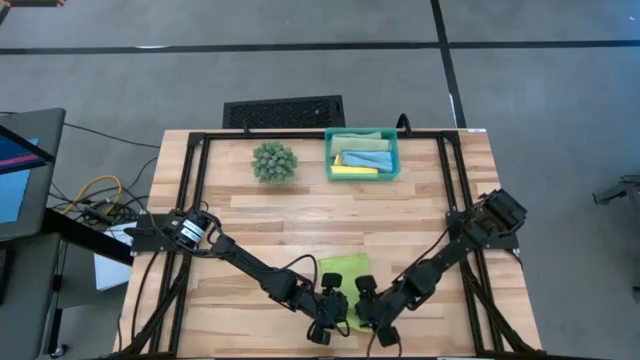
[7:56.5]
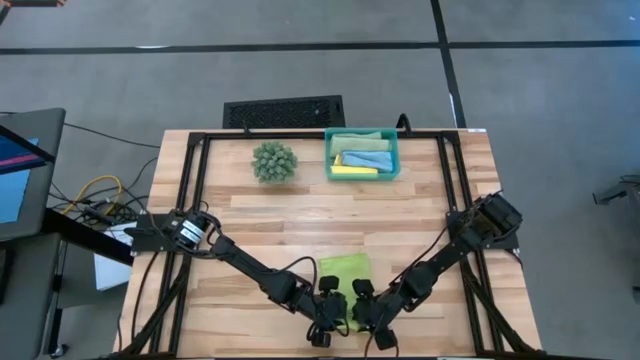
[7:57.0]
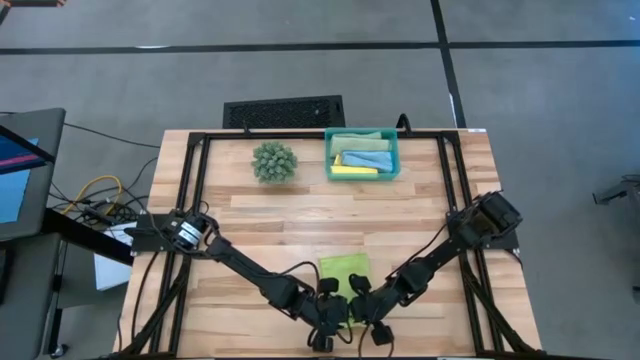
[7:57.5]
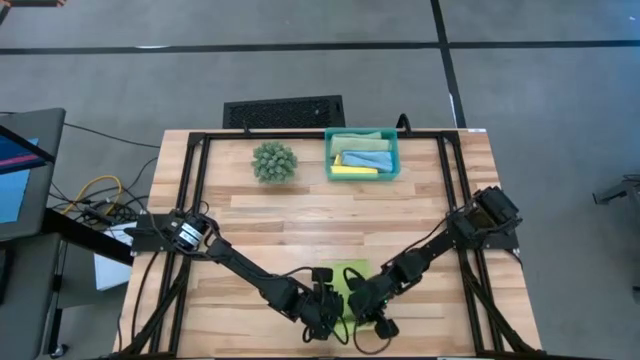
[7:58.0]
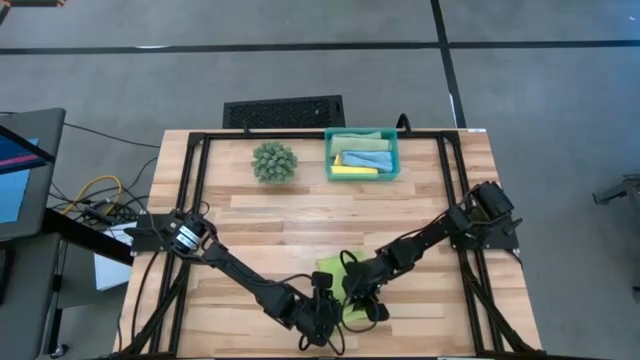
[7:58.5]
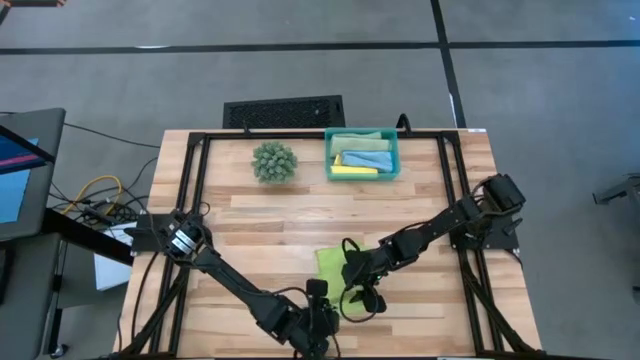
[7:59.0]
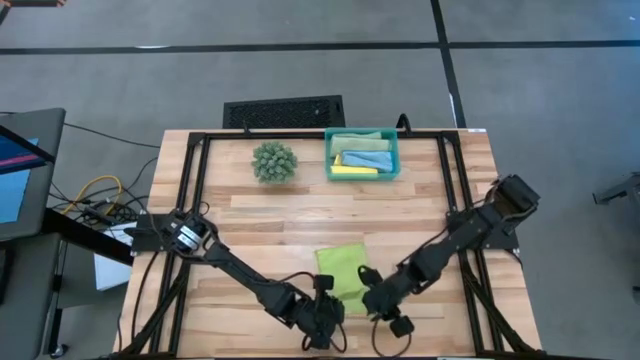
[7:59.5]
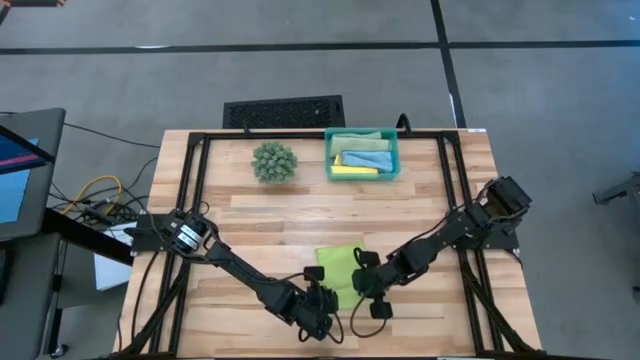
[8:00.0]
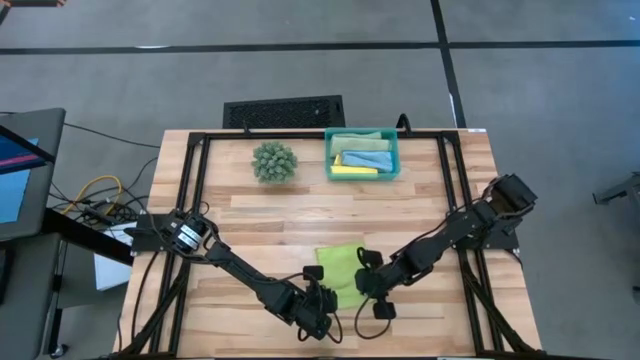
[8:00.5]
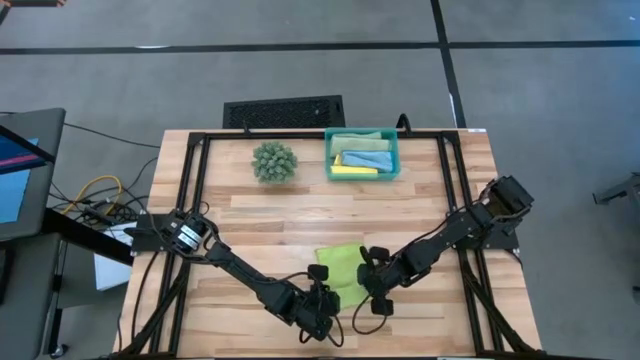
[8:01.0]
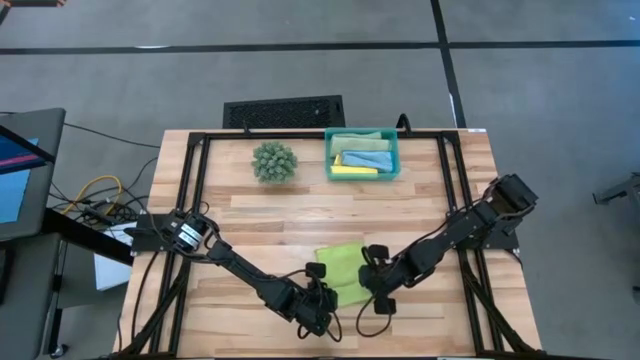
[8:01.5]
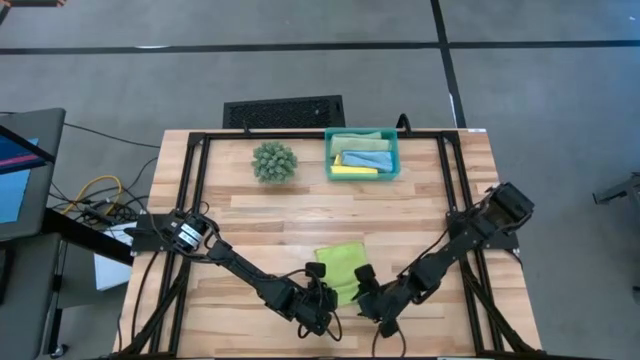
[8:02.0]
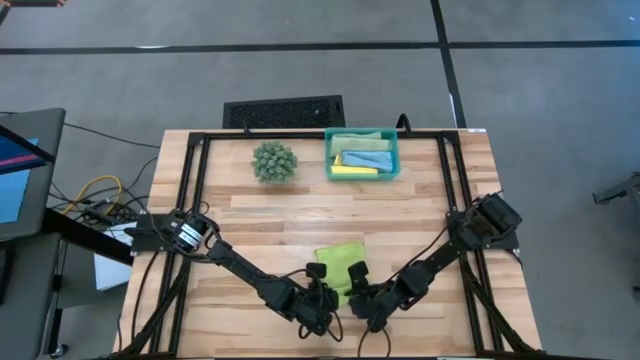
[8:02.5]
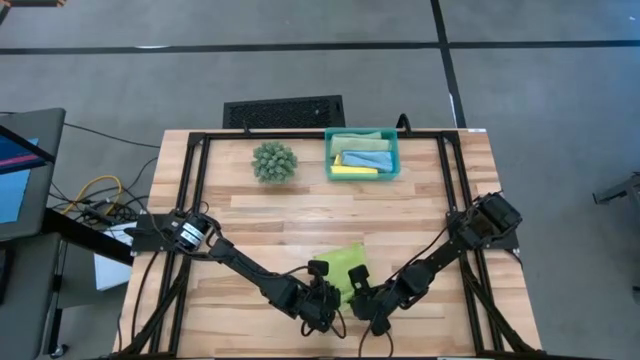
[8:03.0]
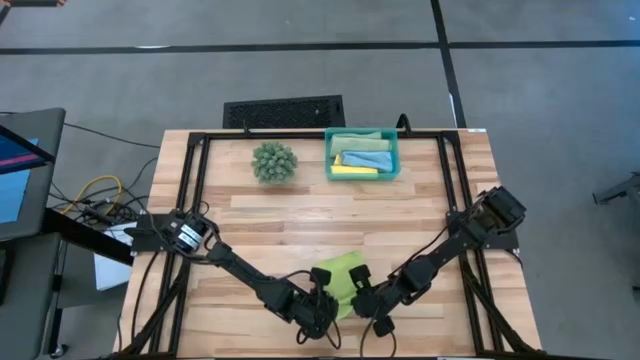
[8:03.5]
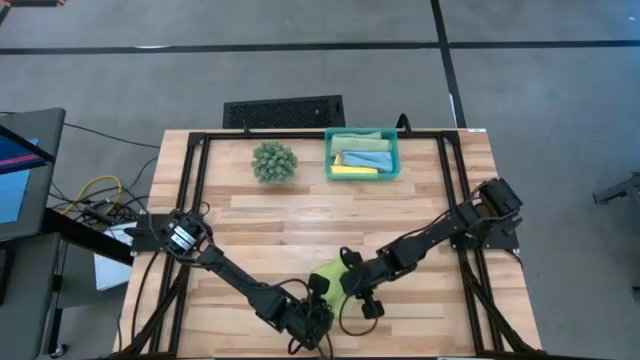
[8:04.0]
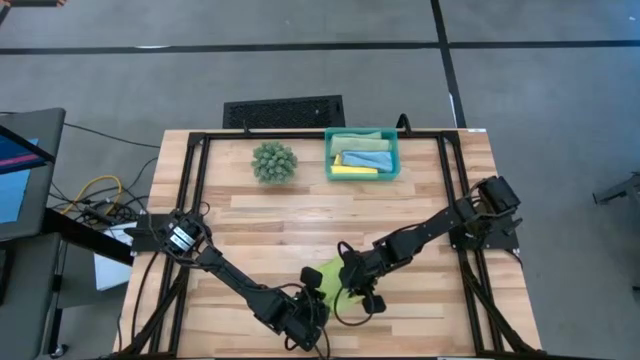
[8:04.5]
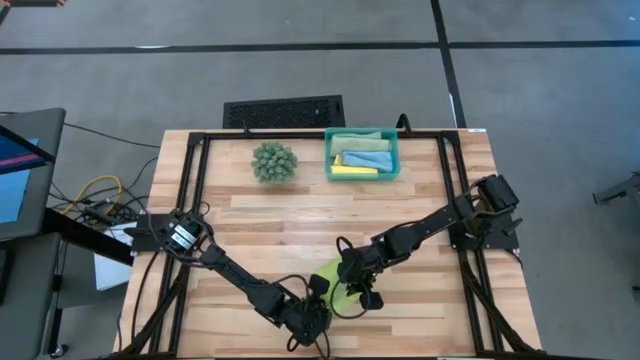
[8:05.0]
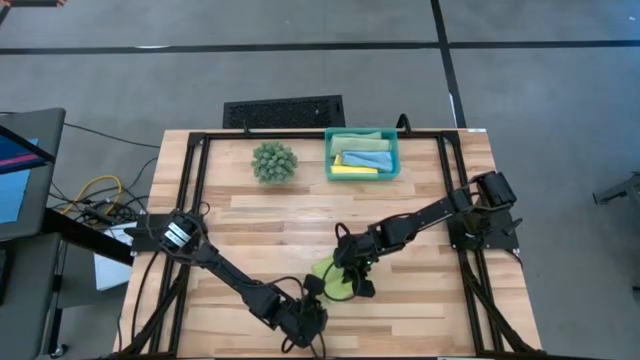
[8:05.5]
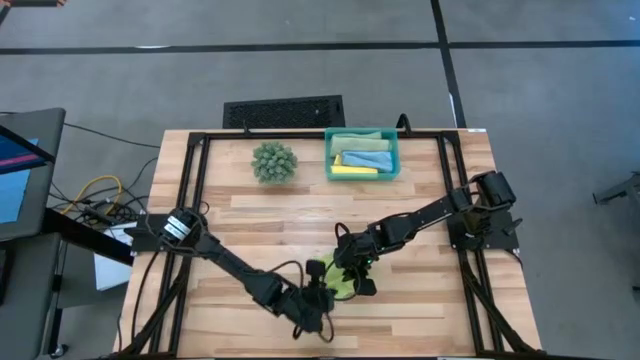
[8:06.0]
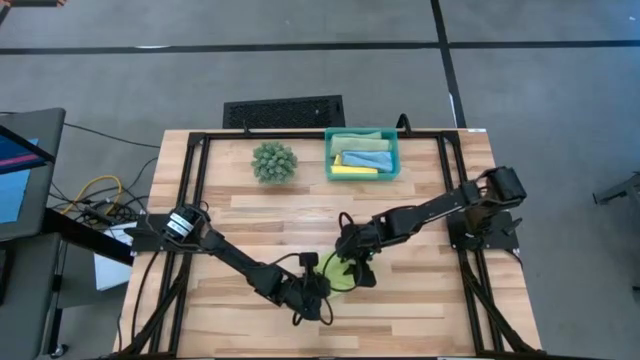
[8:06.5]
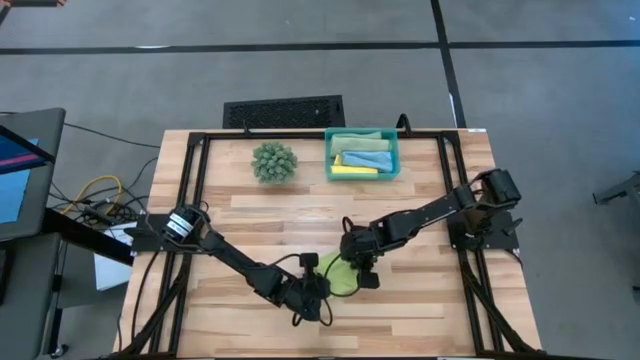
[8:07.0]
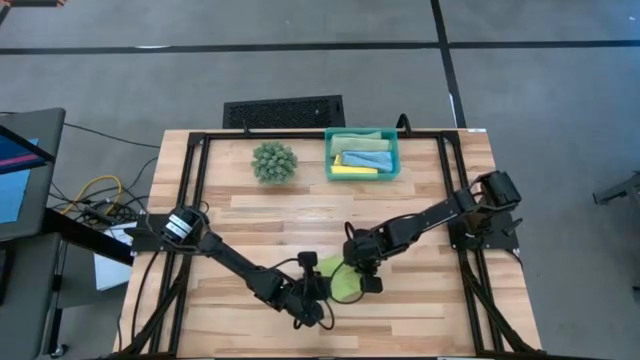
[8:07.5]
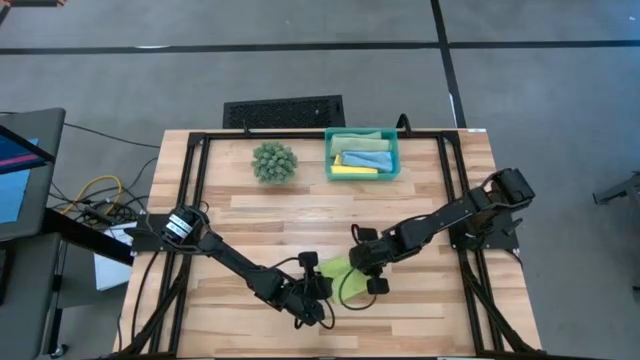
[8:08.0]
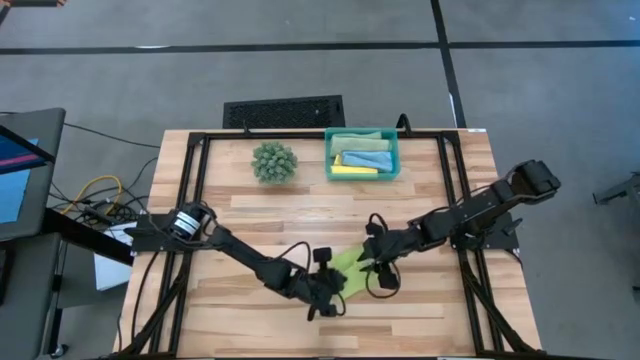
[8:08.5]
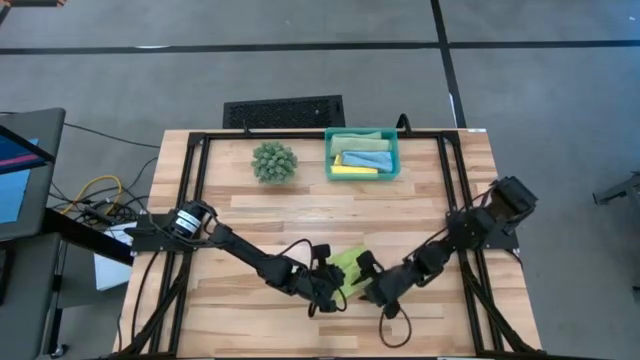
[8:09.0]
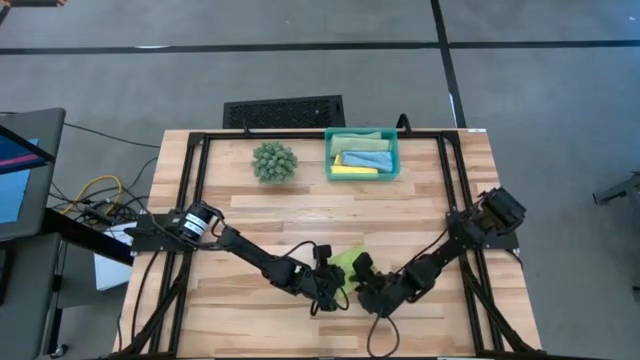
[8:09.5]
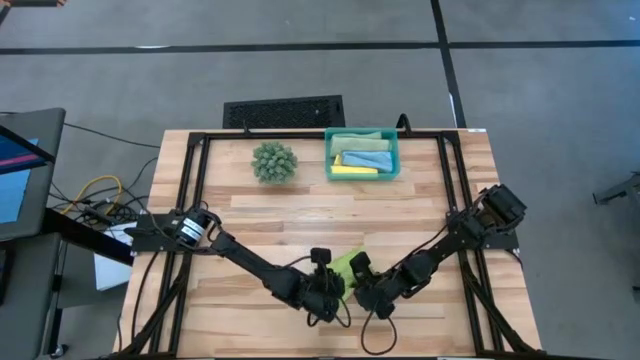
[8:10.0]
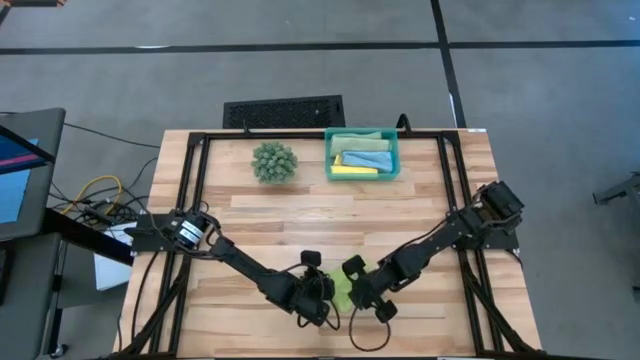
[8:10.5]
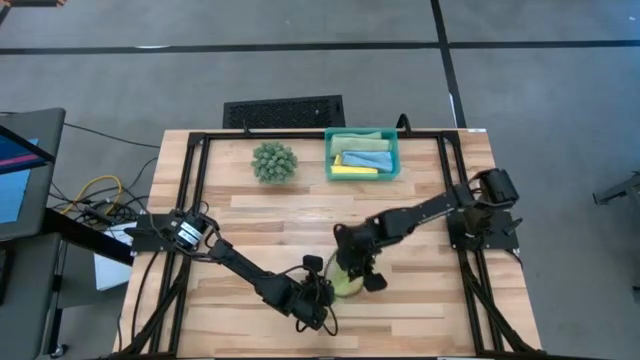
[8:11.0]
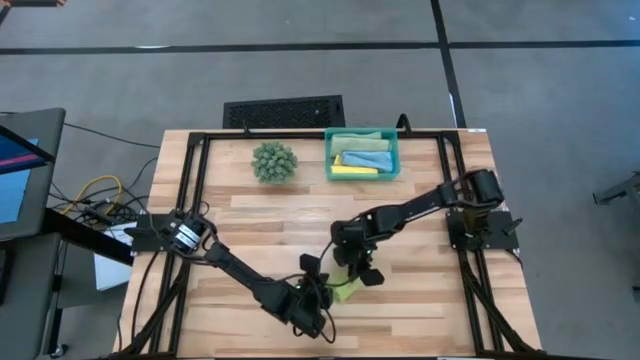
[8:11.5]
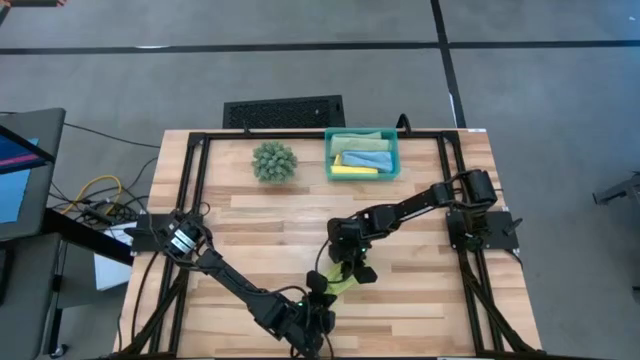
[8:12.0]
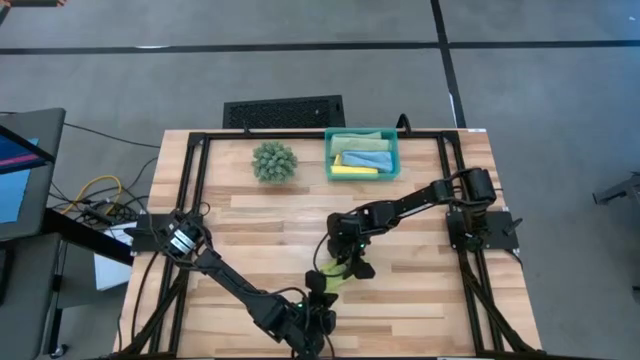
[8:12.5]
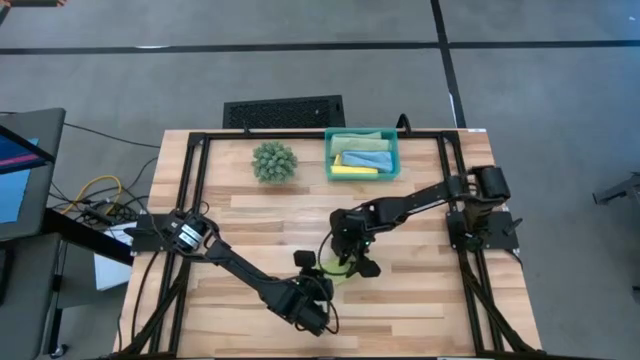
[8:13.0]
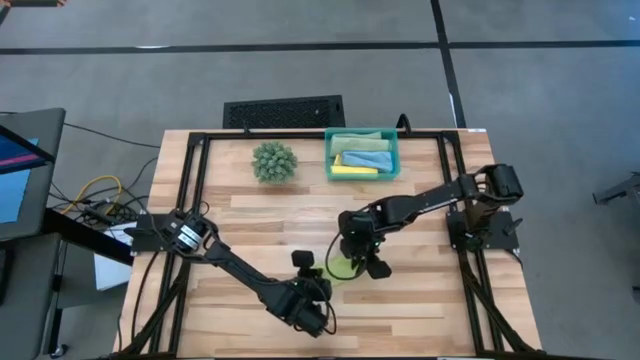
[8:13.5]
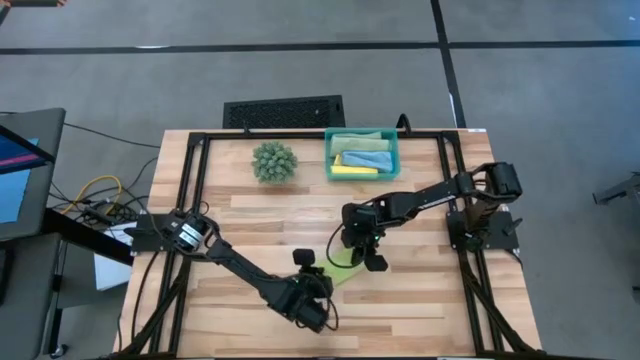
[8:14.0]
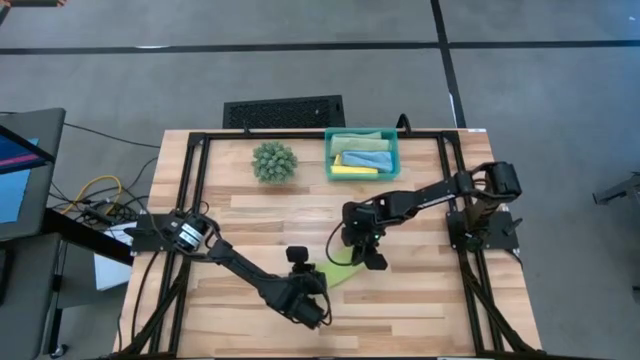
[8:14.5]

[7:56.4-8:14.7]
Task: Roll microfiber towels into tight, uniform cylinder then place into a basket
Roll the green microfiber cloth

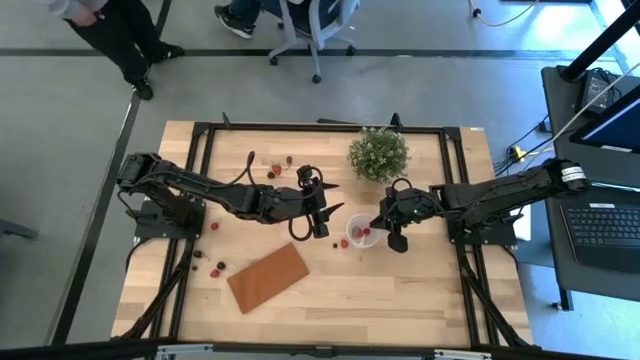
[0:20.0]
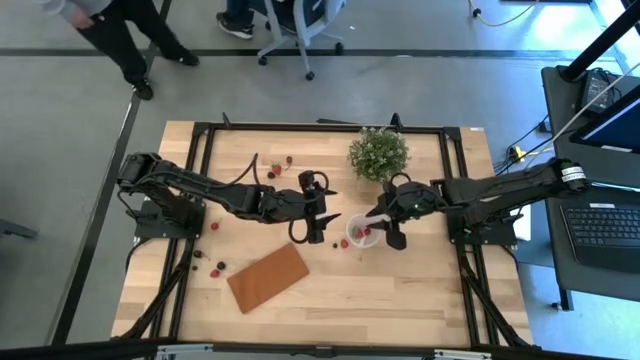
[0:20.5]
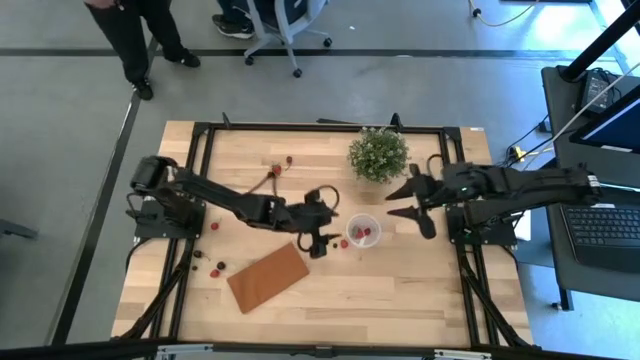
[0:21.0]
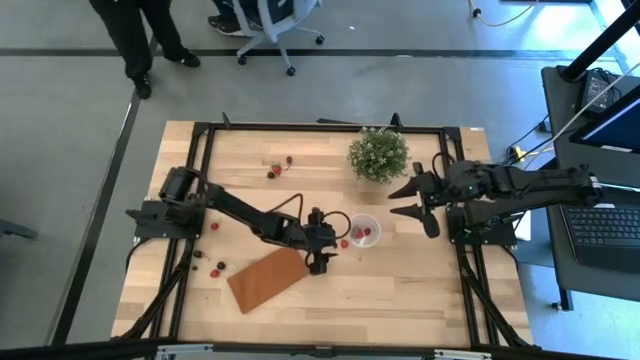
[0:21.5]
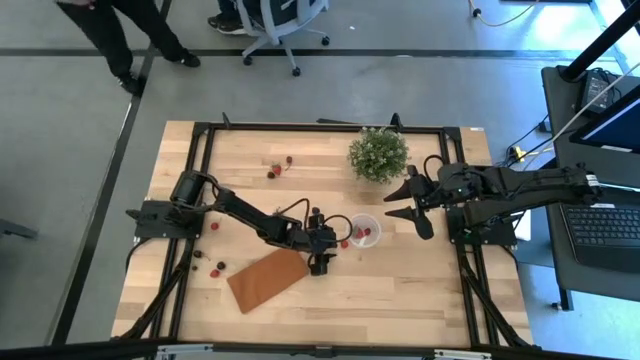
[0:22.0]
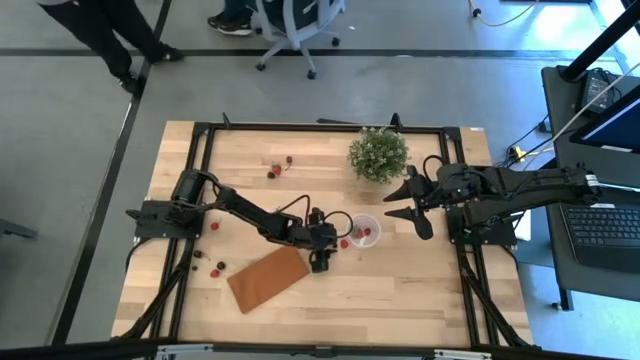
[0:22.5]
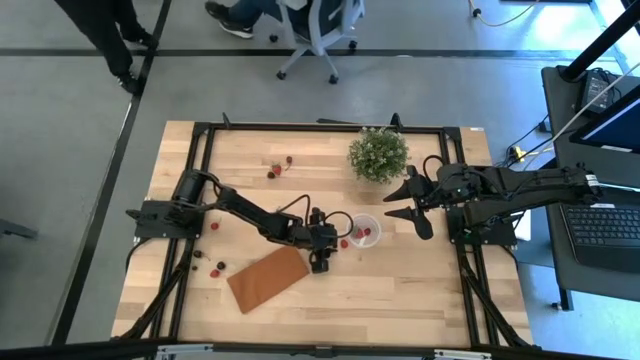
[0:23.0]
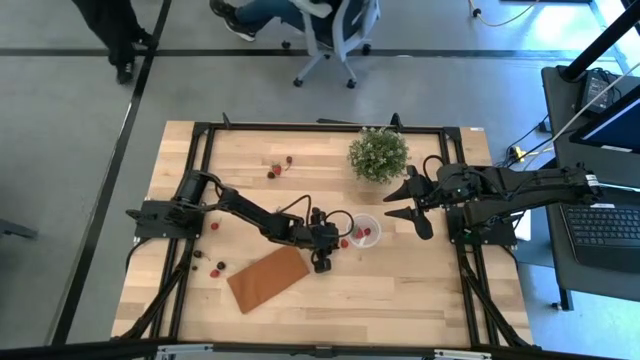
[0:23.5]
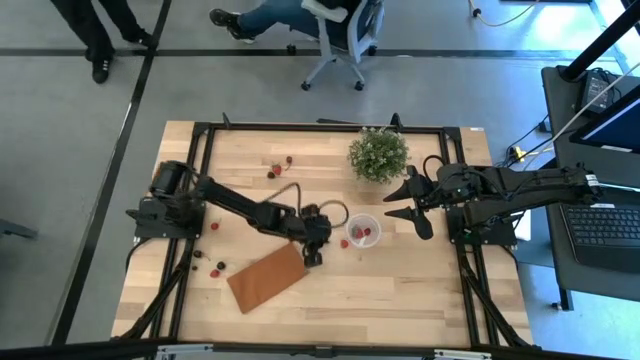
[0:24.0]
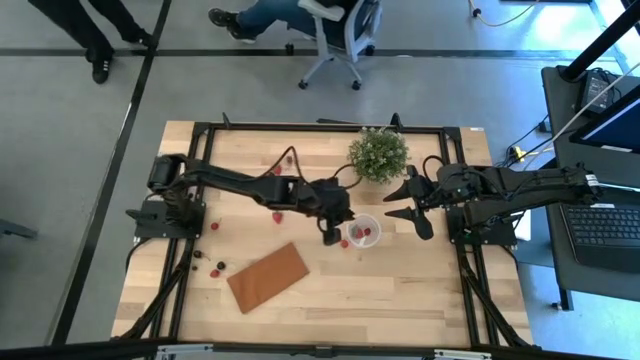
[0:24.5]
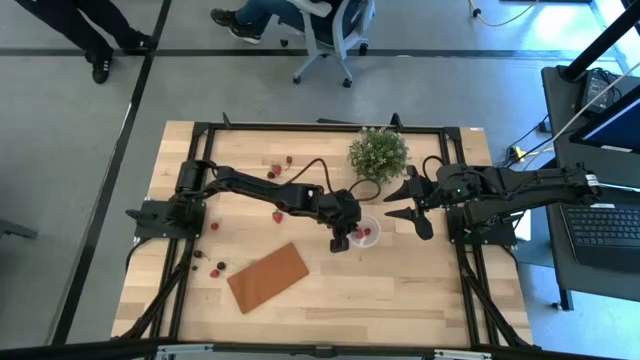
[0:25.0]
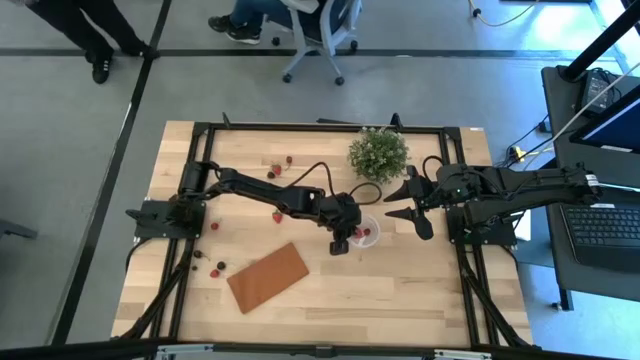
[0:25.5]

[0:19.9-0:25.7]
Task: Pick and placing Produce into tupperware
Put the blueberry into the transparent container
